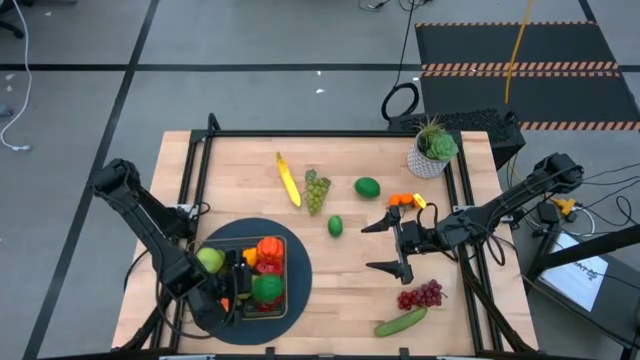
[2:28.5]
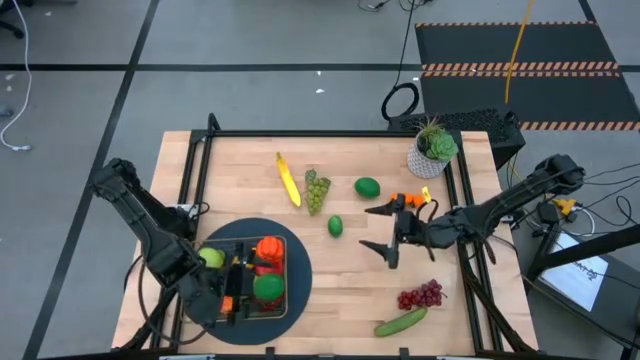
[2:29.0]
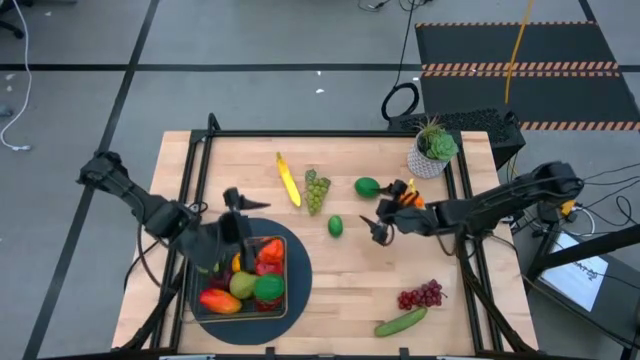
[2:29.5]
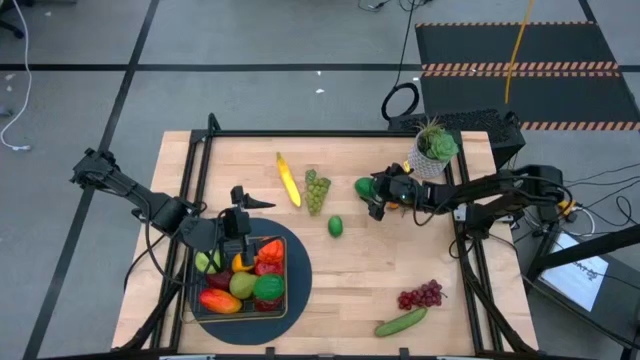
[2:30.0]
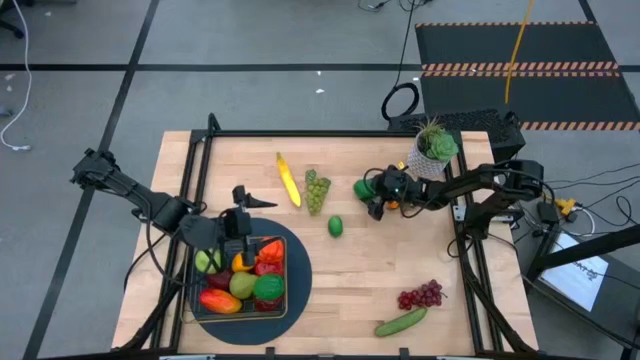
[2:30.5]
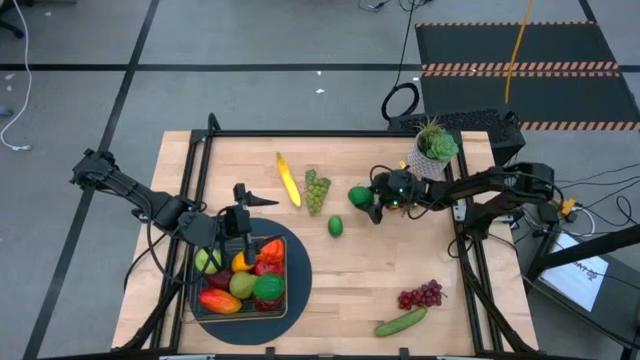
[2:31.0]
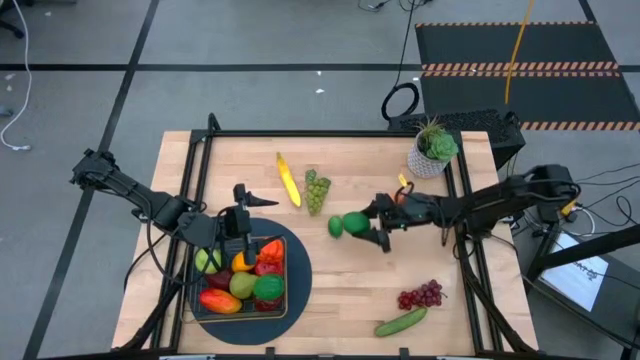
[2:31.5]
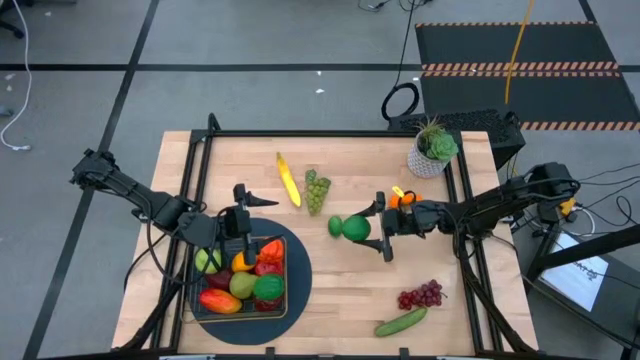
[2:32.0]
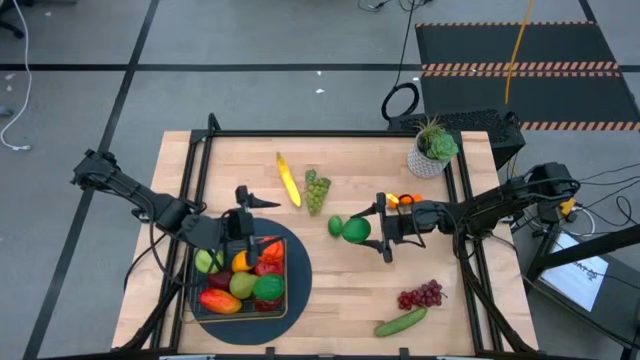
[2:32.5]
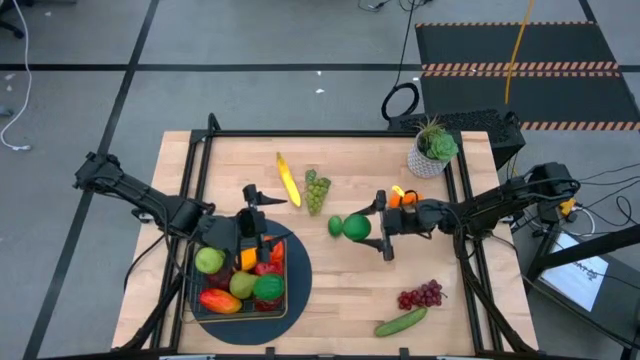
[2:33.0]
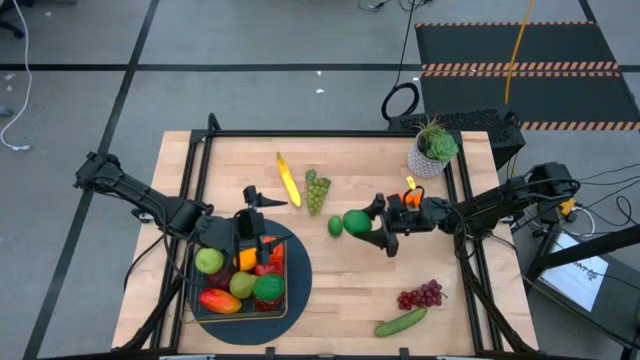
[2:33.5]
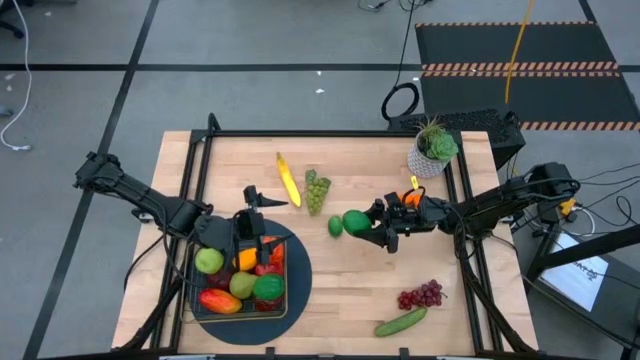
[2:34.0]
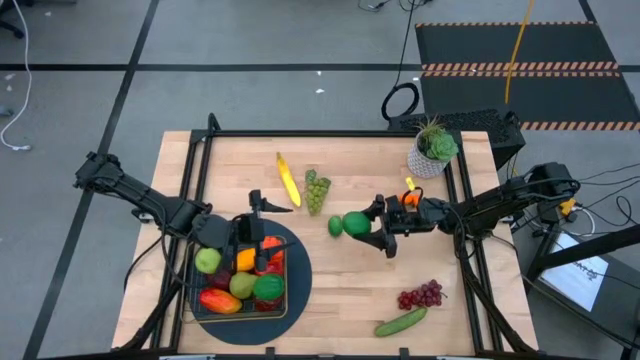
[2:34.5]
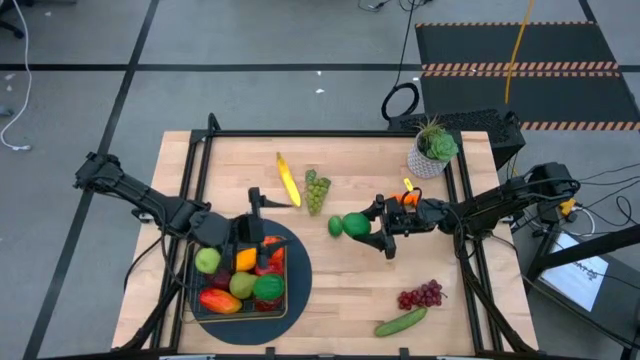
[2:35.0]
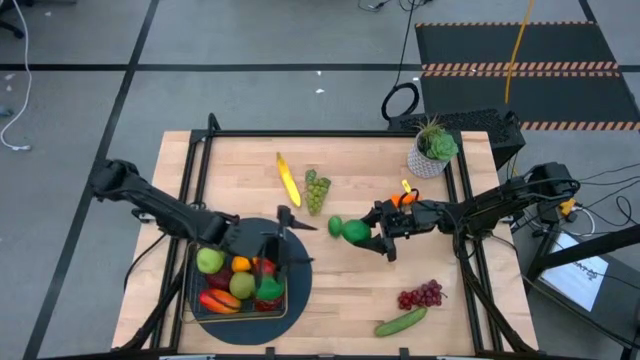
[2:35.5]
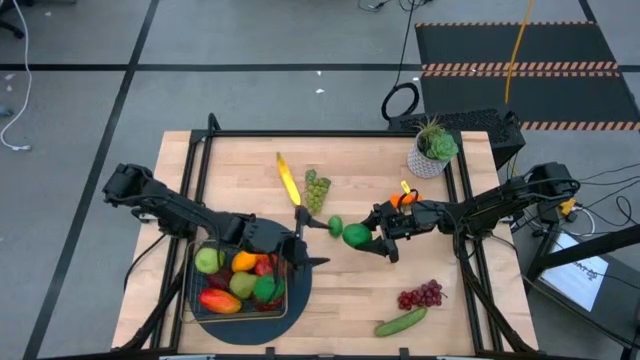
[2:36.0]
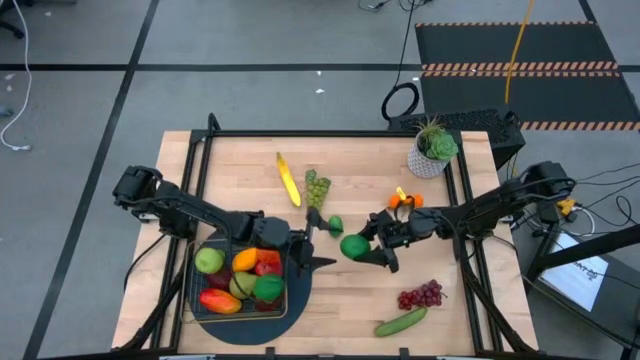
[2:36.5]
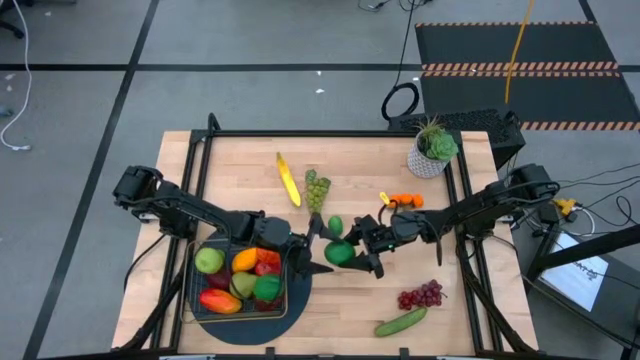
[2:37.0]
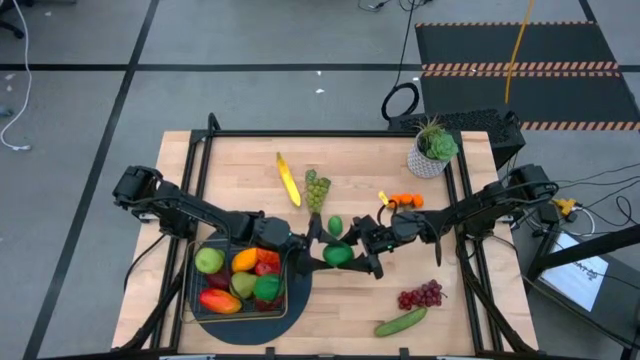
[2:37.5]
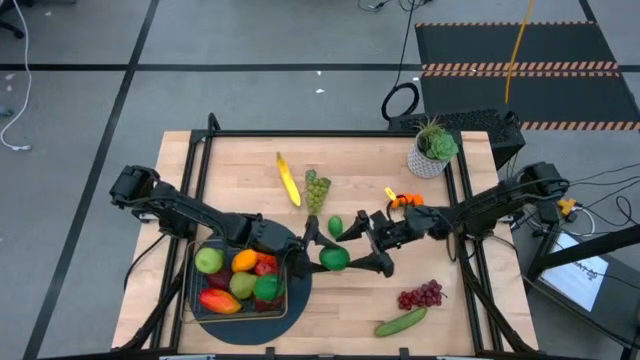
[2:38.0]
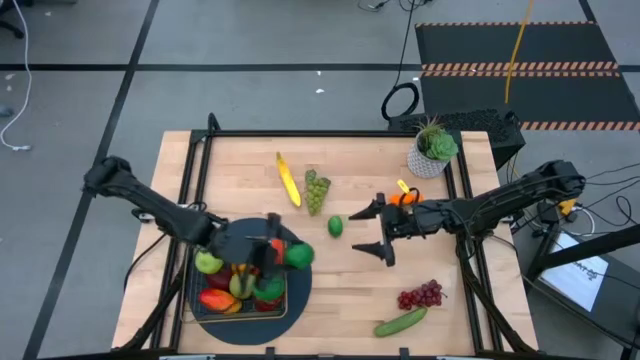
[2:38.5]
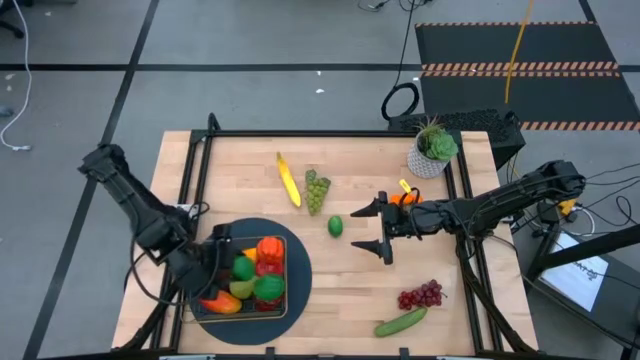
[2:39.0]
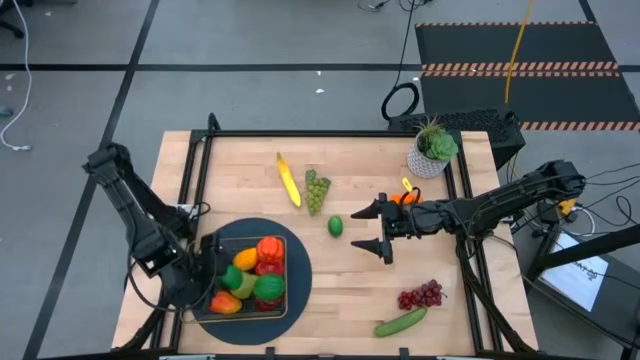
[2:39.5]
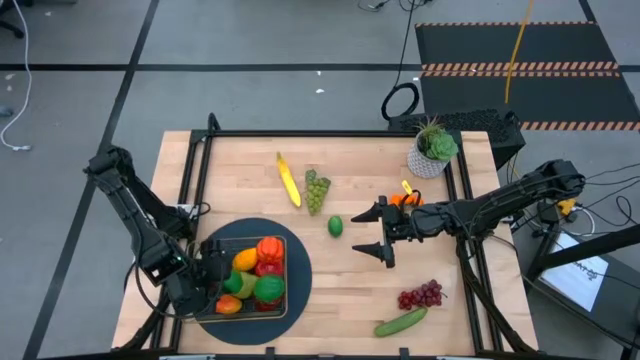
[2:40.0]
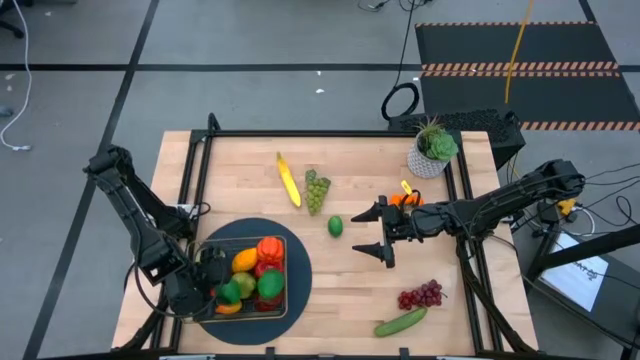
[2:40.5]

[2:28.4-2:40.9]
Task: Build produce basket
Put the top lime into the gold wire basket

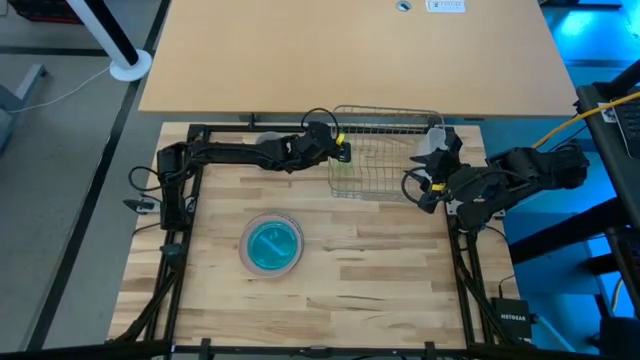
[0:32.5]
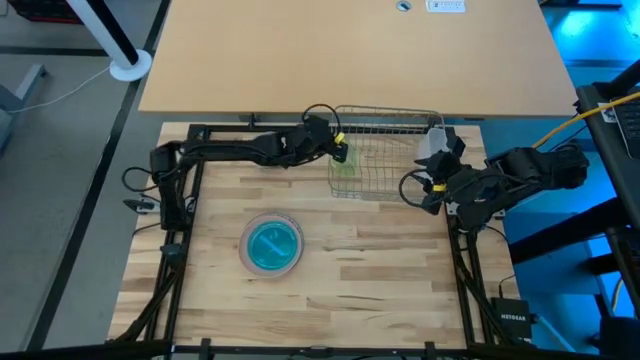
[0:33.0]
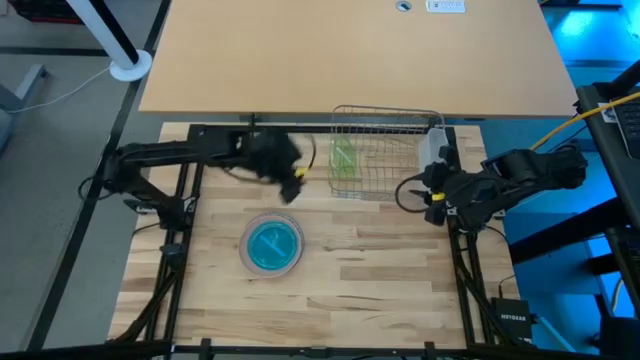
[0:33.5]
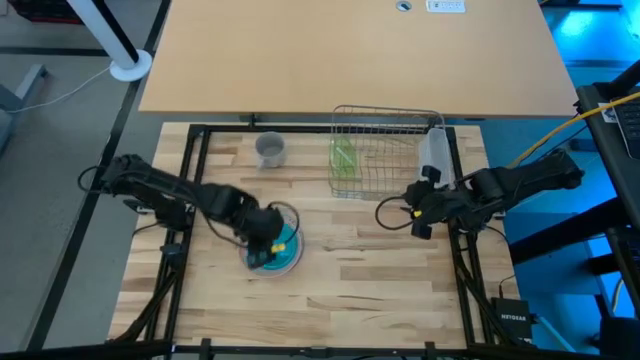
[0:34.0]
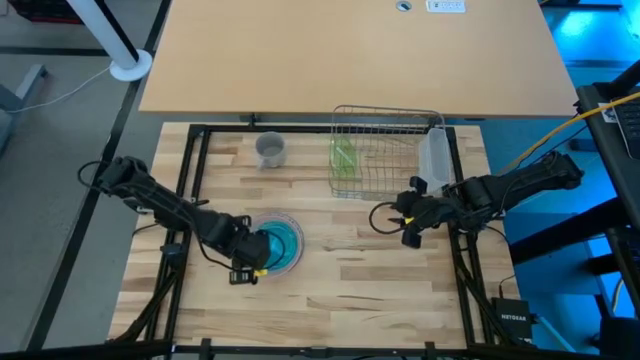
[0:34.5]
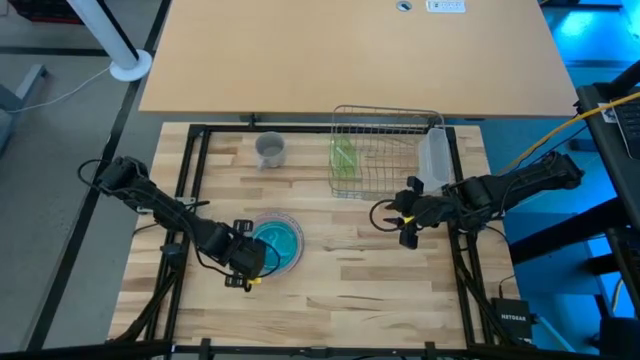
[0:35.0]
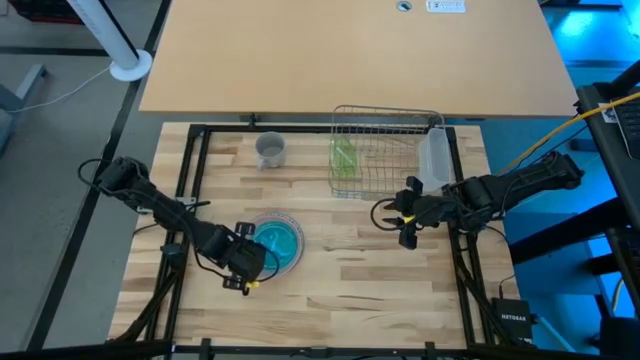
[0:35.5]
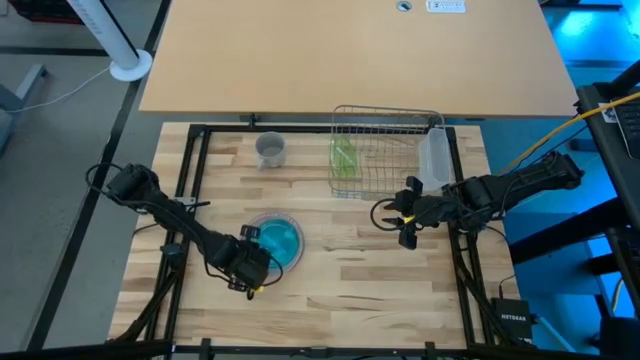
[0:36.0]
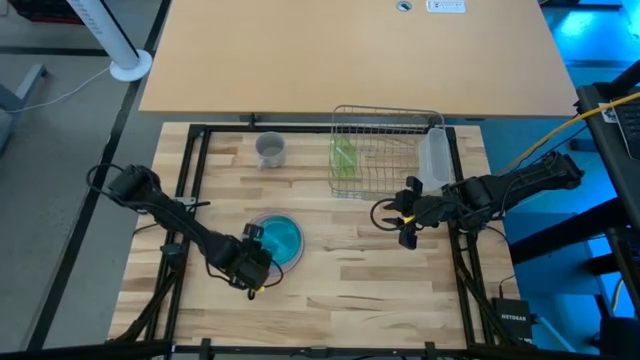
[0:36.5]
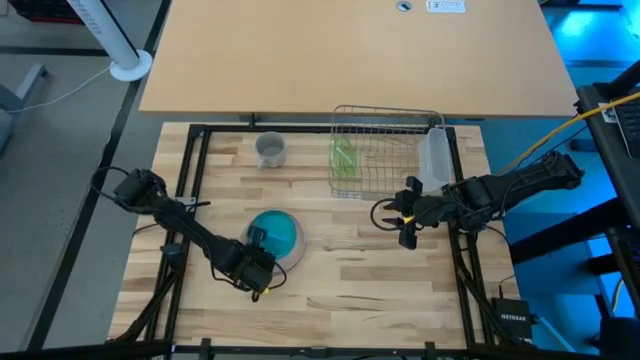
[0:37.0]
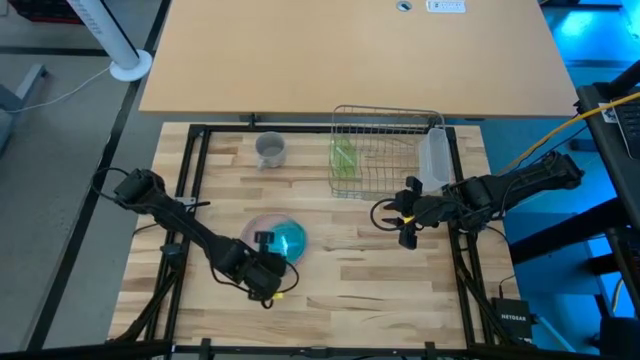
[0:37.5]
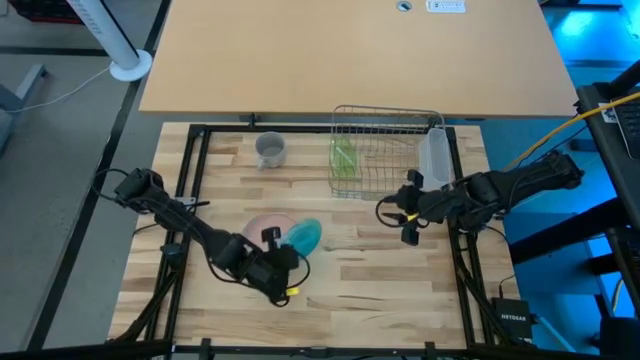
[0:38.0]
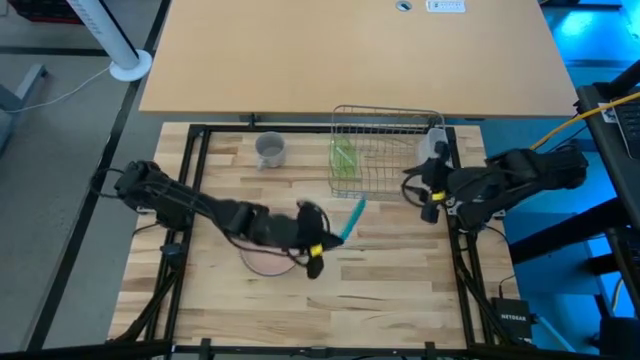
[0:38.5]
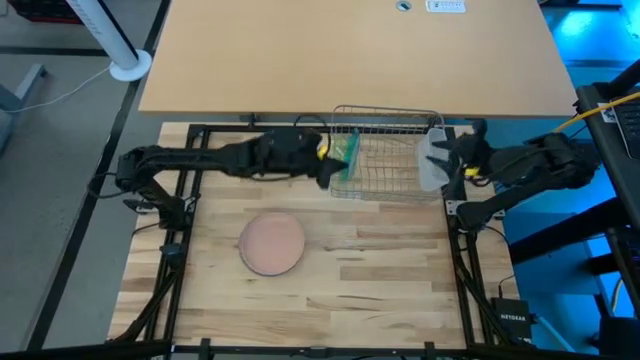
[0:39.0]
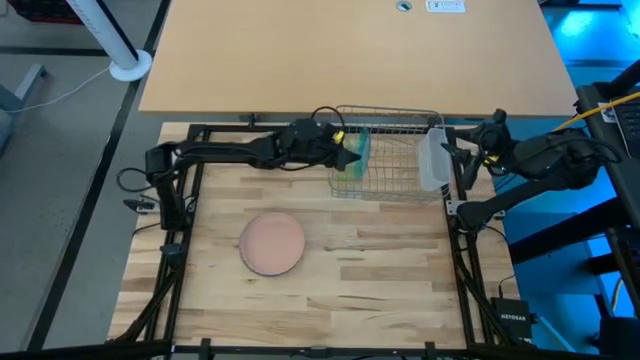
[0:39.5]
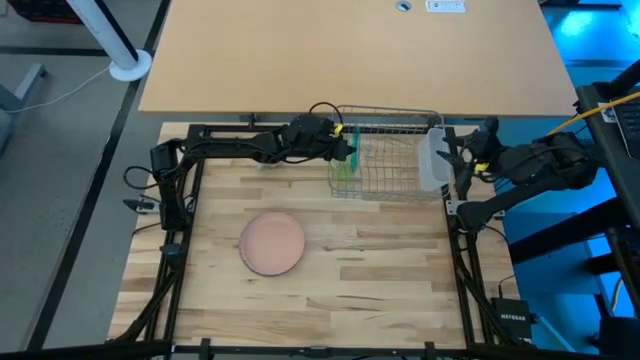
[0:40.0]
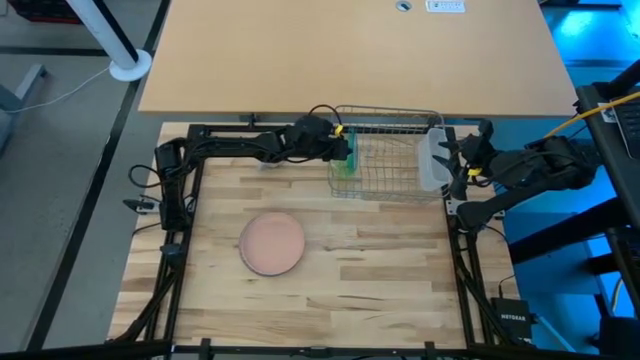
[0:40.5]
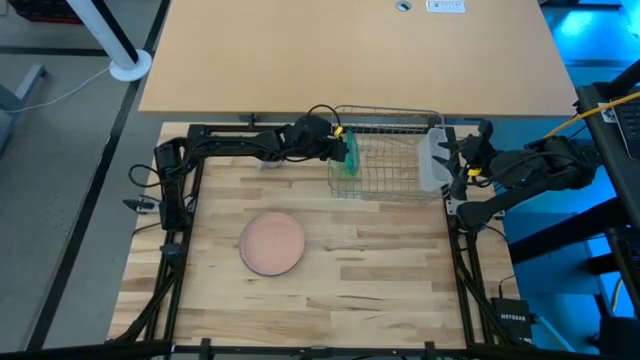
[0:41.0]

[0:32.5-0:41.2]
Task: Sort dishes
Put the blue plate into the dish rack
